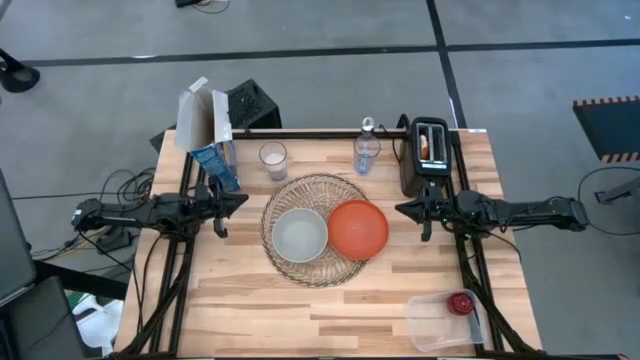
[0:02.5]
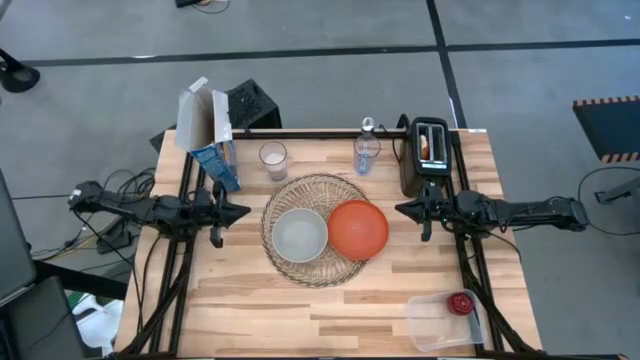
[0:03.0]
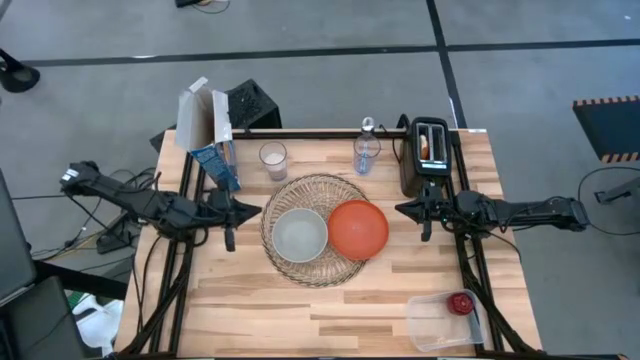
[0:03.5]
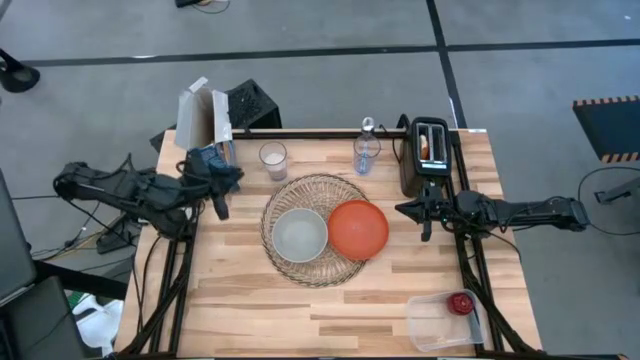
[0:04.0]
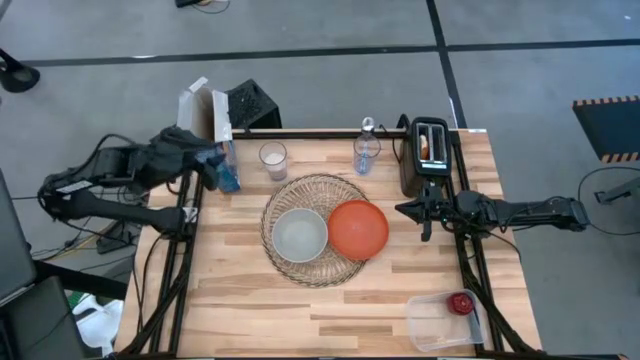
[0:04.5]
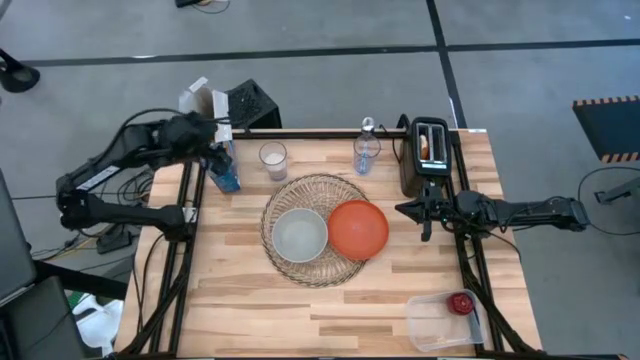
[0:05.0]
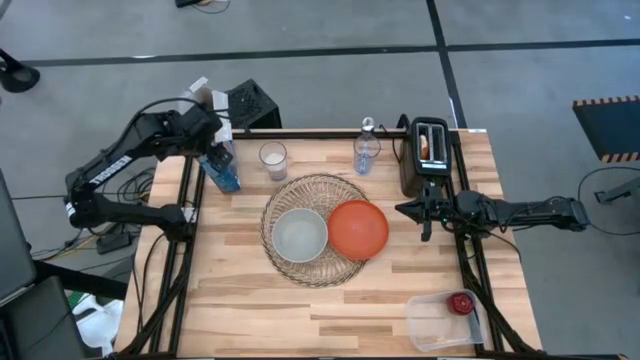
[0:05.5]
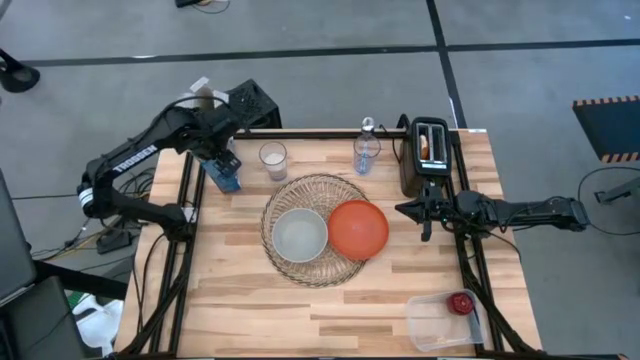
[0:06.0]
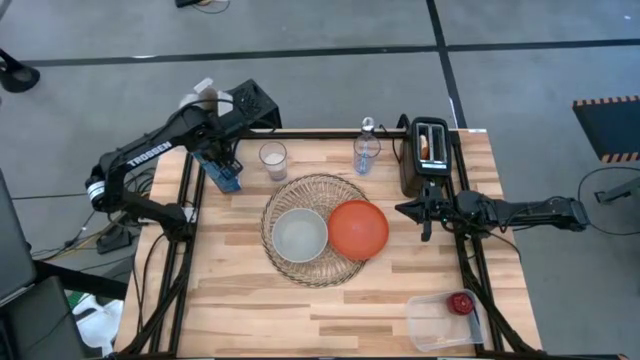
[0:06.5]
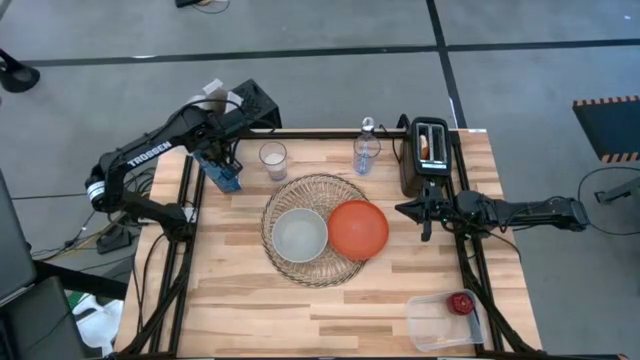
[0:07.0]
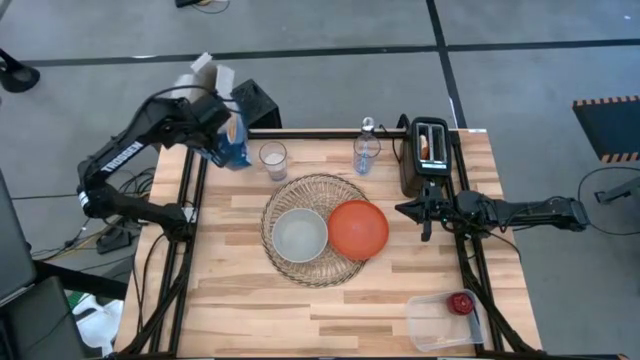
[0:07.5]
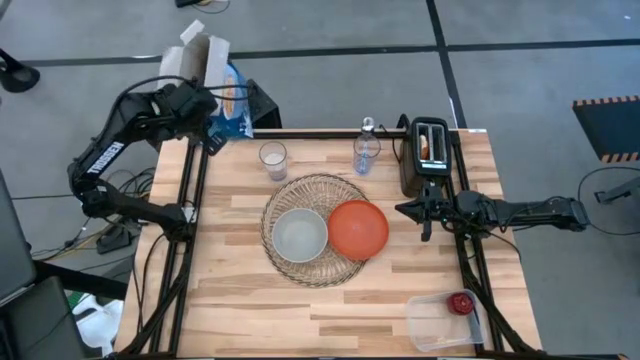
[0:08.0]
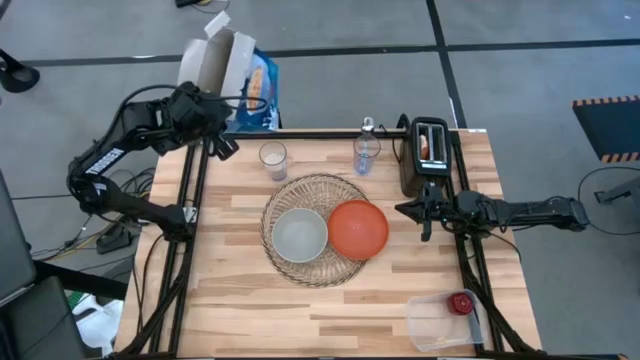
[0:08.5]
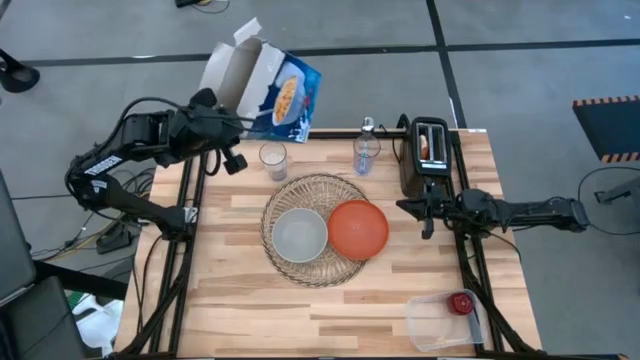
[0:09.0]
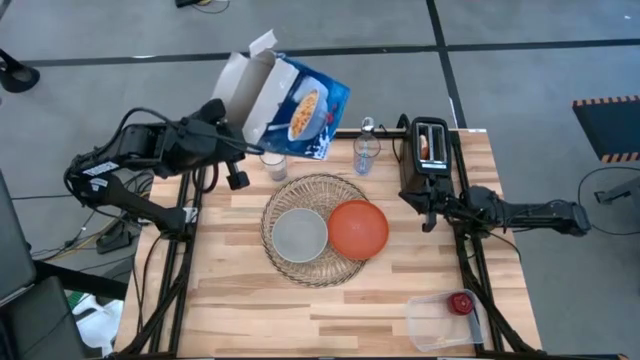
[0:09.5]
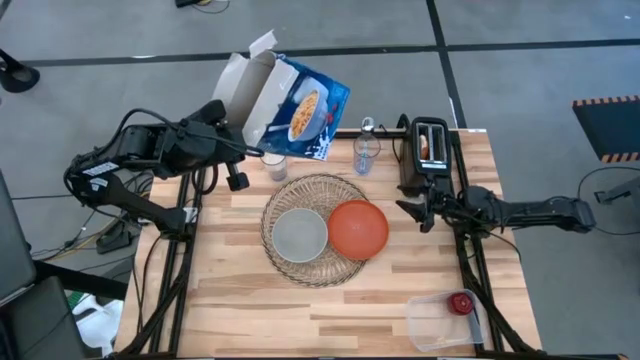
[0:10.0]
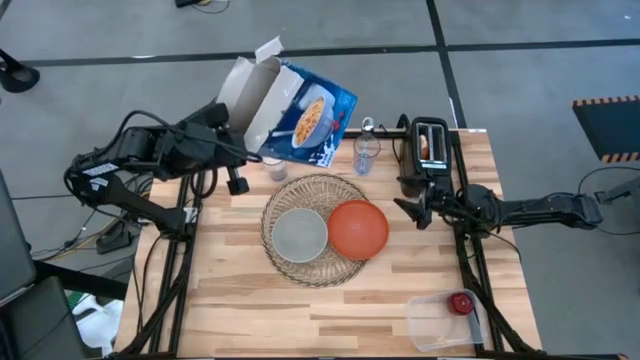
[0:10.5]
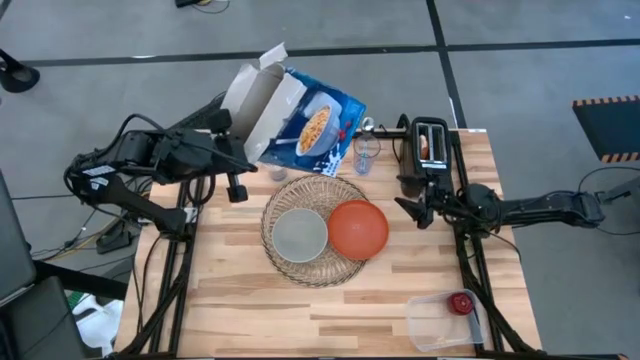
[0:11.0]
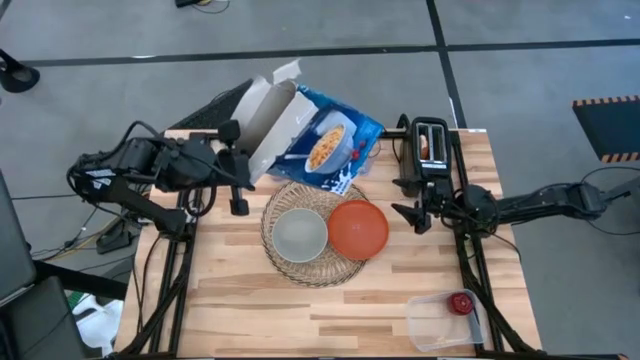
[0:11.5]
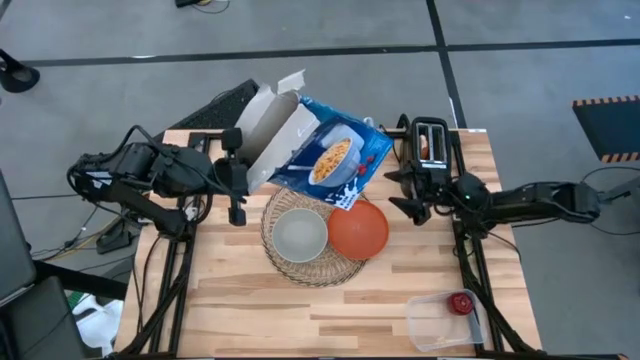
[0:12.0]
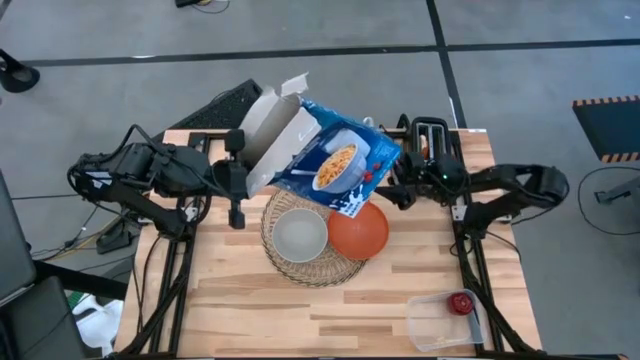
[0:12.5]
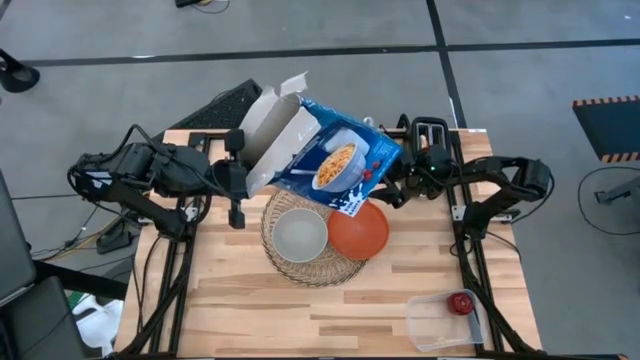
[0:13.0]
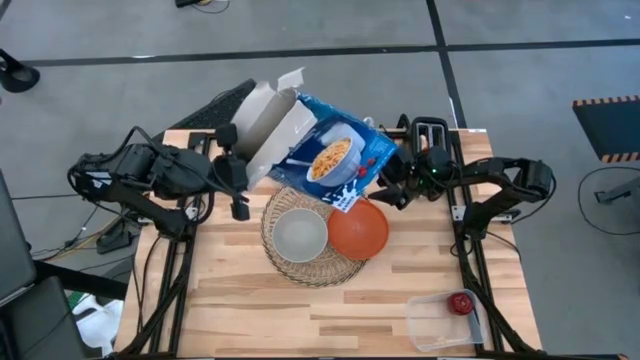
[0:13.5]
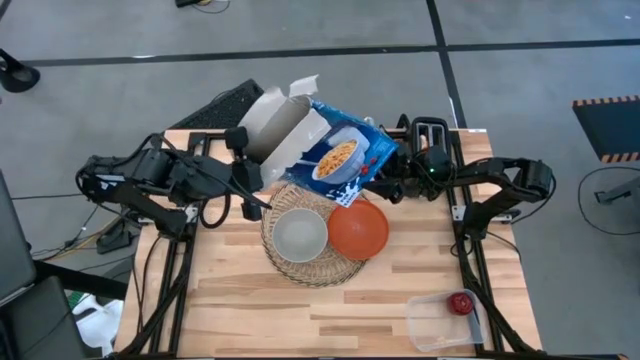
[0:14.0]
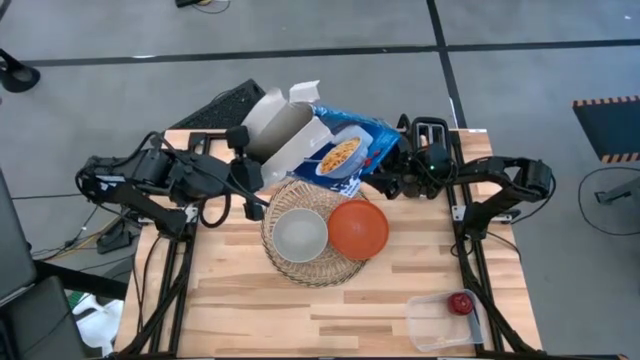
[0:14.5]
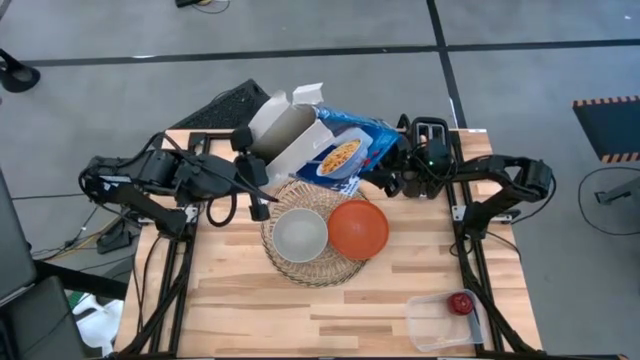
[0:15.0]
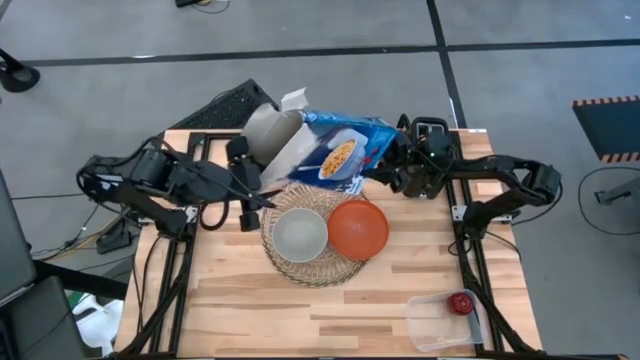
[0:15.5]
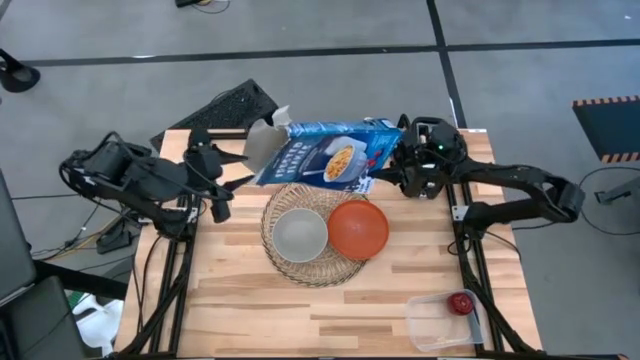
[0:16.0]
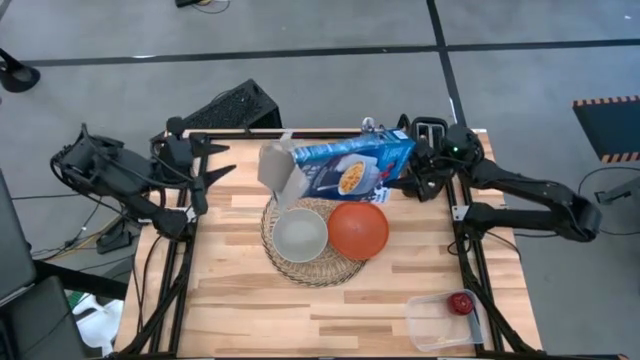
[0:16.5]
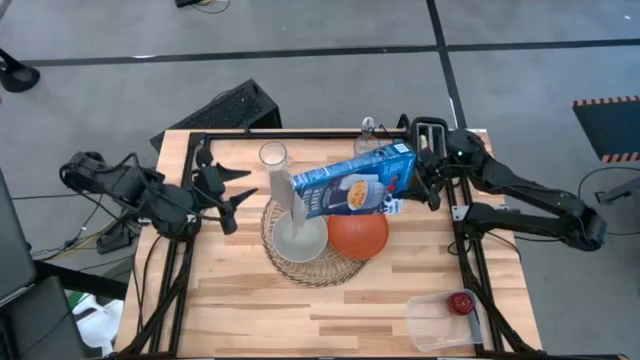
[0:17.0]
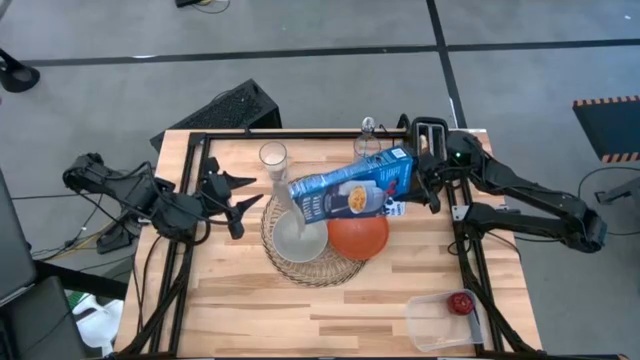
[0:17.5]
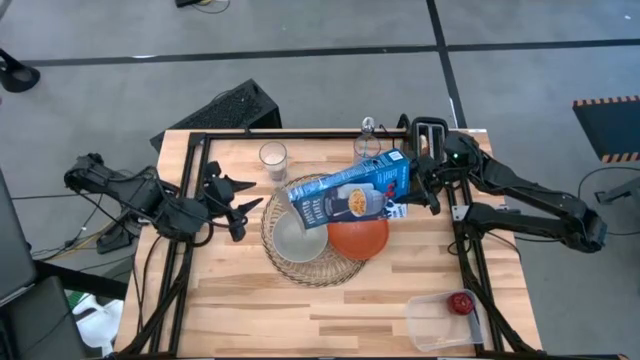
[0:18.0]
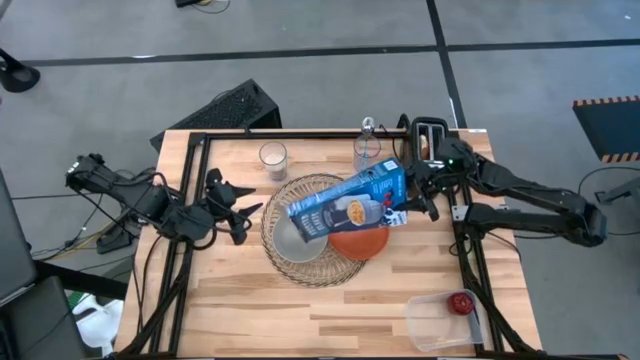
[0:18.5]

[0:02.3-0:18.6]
Task: Arrange a breakfast setting
Pour the cereal from the cereal box into the white bowl
